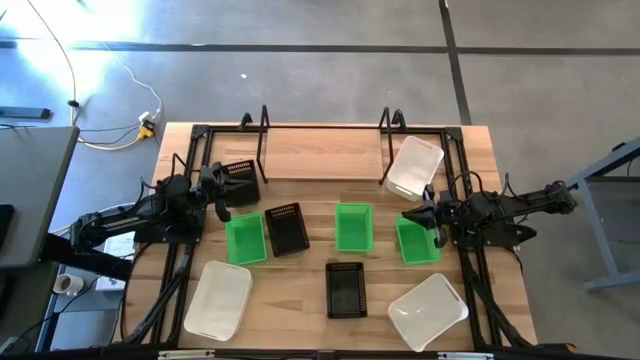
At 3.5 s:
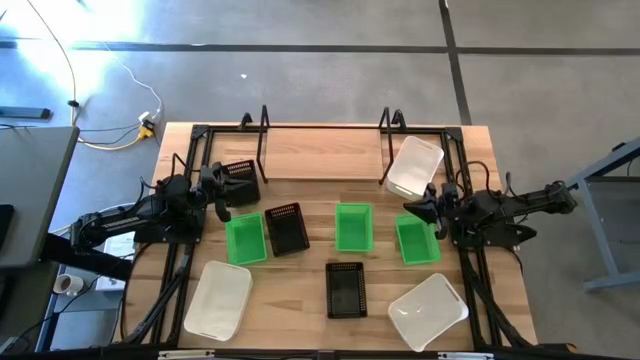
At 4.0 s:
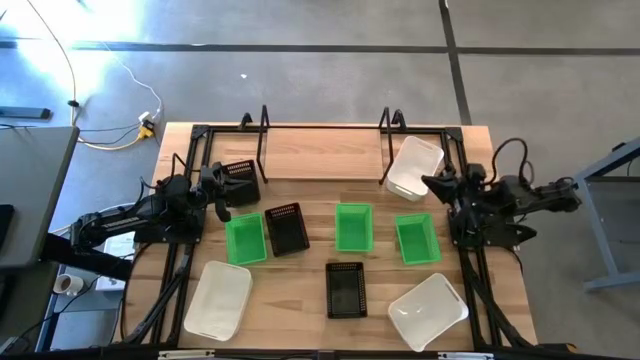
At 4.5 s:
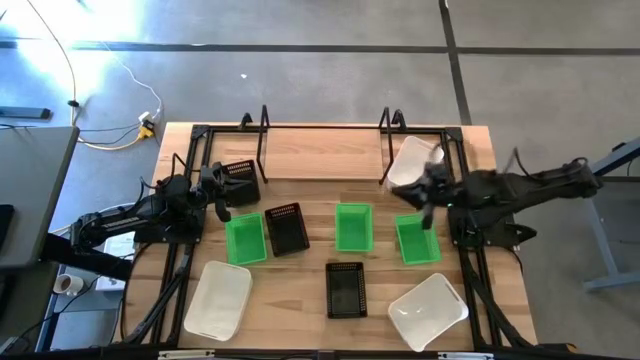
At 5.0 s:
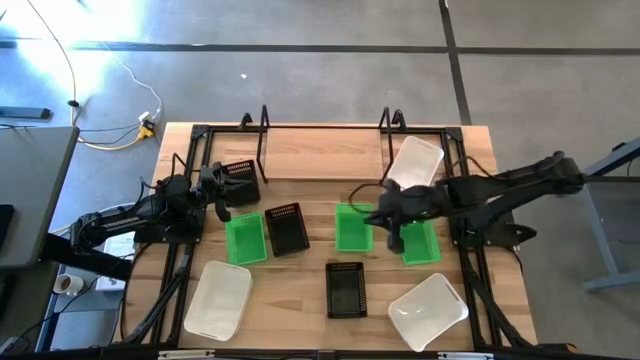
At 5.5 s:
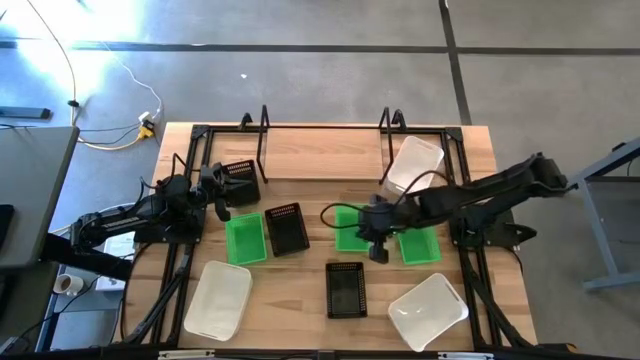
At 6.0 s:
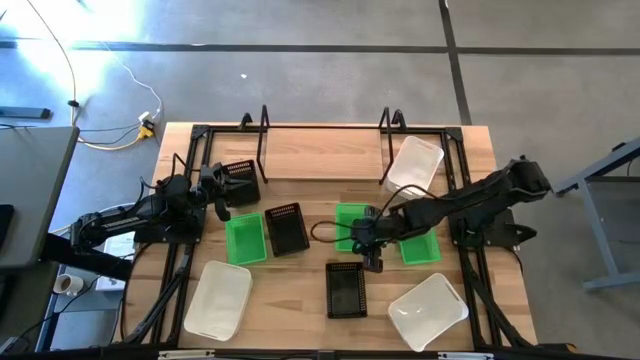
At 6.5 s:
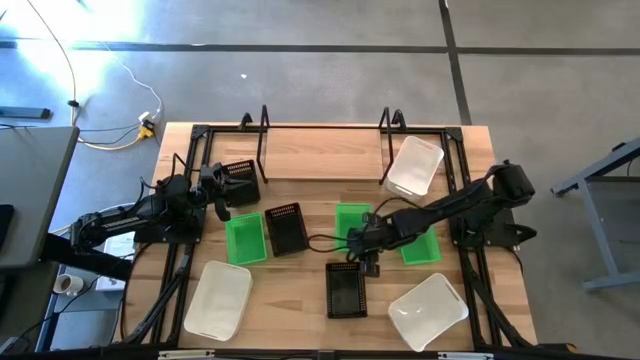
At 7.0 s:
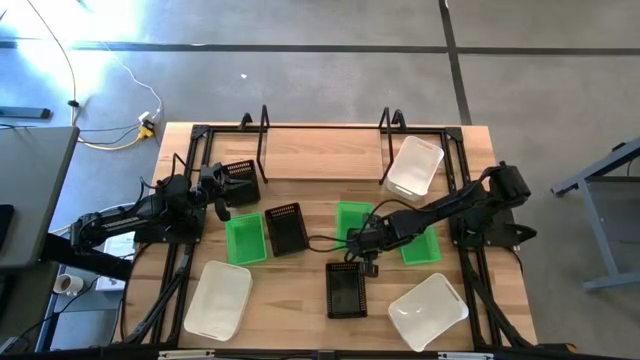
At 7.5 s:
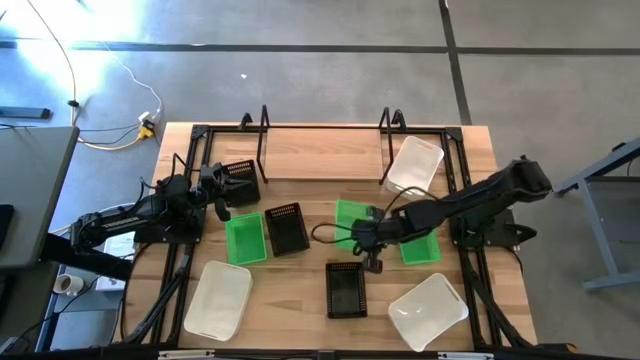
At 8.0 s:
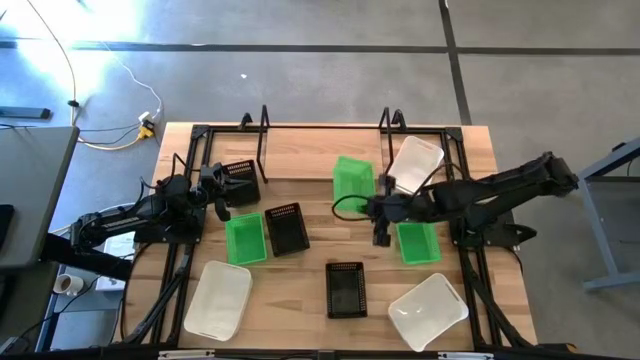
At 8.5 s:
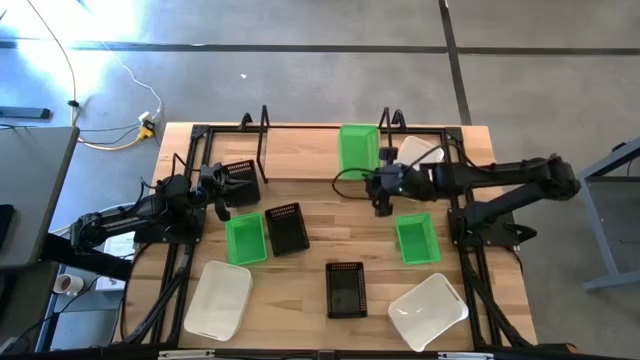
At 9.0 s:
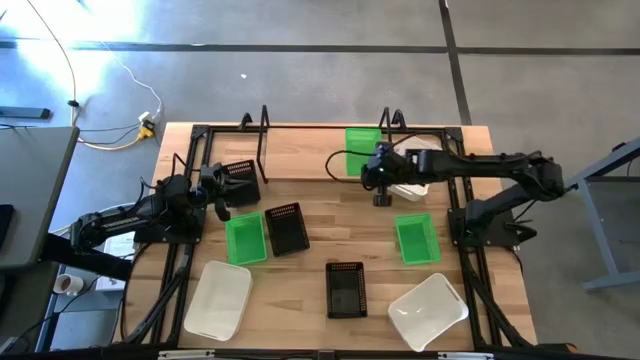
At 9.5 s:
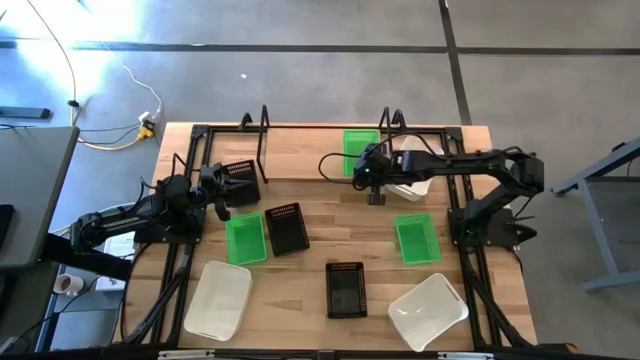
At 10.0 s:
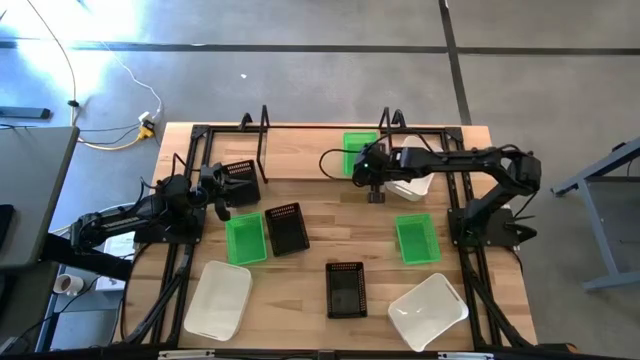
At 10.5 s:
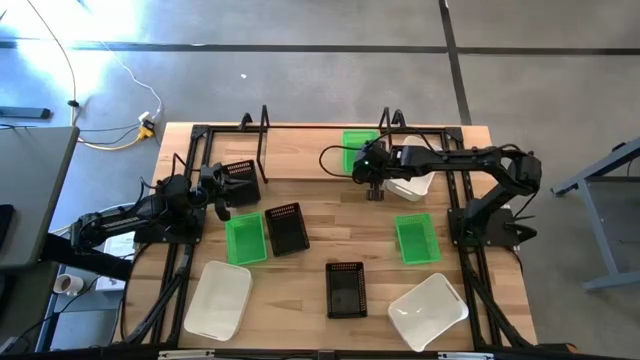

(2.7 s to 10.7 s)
Task: Stack baskets on shelf by color
Put the middle green basket on the shelf

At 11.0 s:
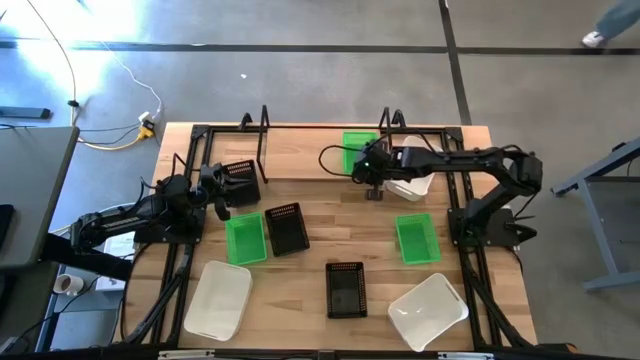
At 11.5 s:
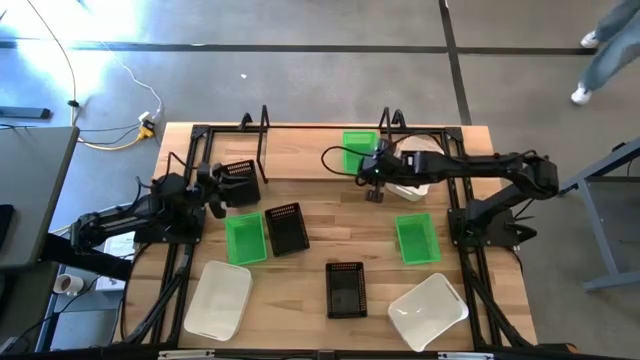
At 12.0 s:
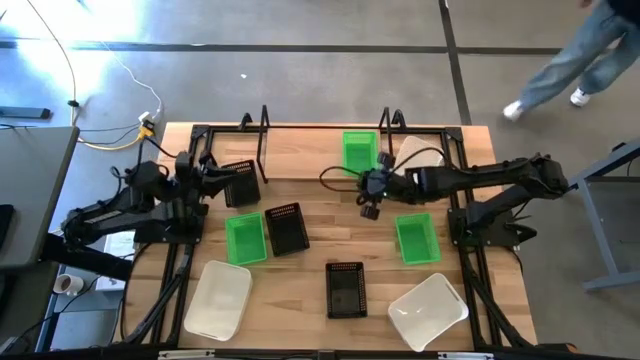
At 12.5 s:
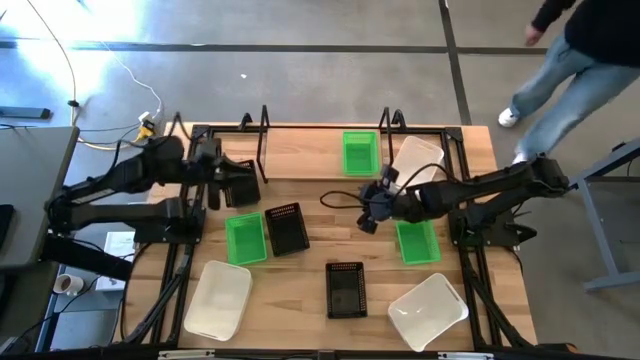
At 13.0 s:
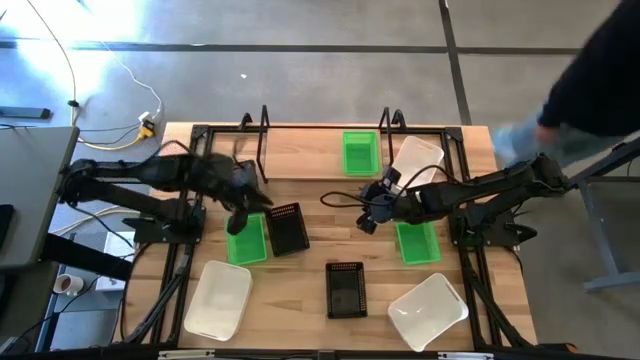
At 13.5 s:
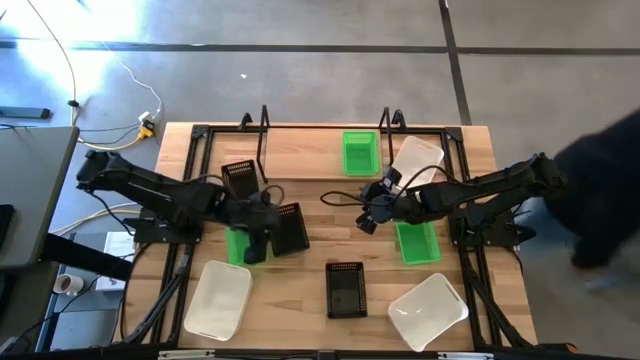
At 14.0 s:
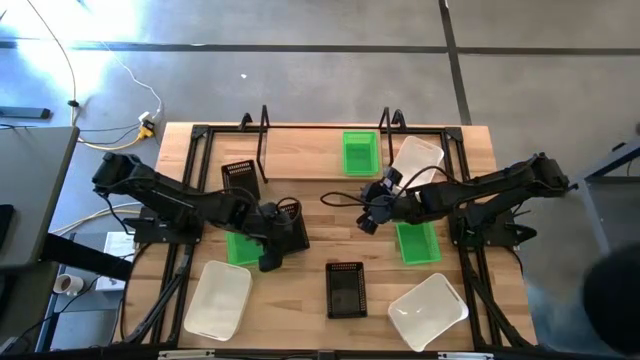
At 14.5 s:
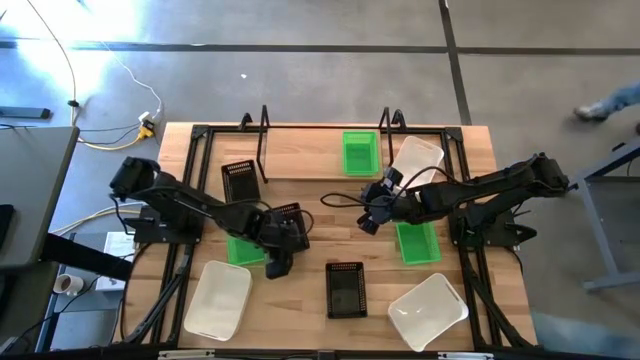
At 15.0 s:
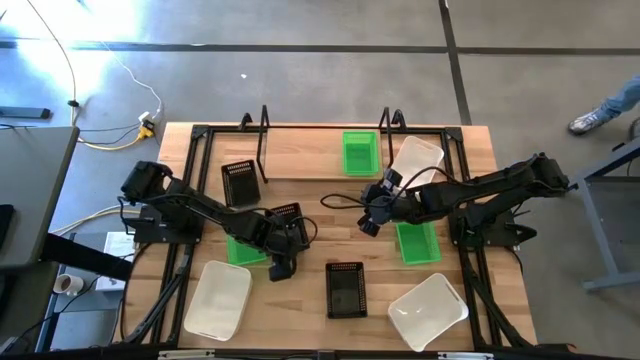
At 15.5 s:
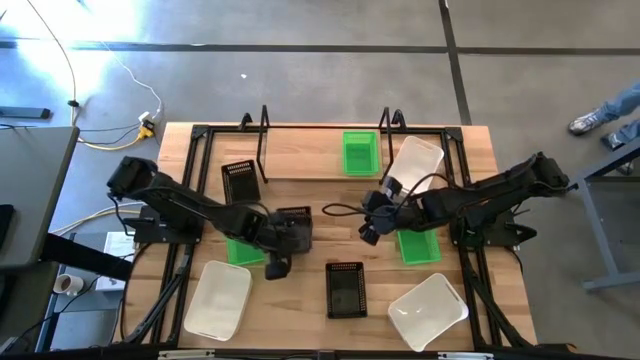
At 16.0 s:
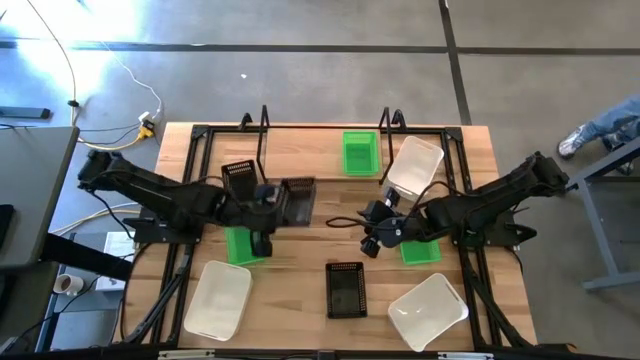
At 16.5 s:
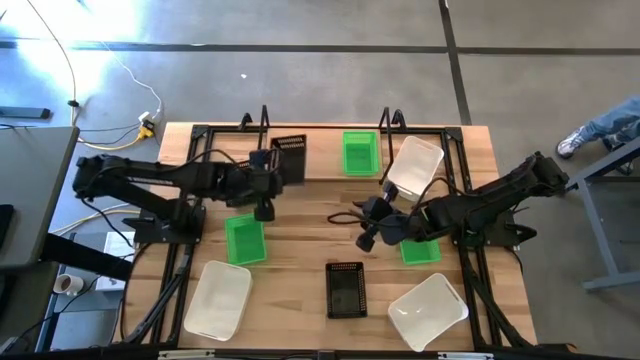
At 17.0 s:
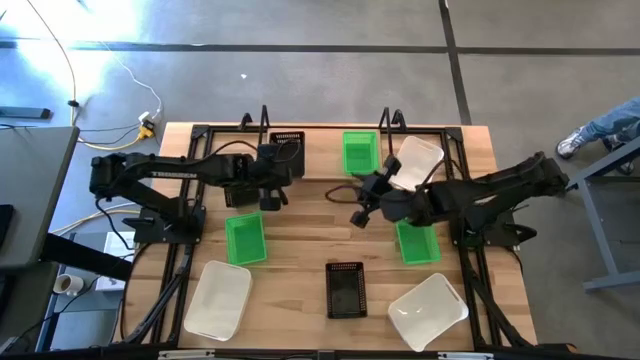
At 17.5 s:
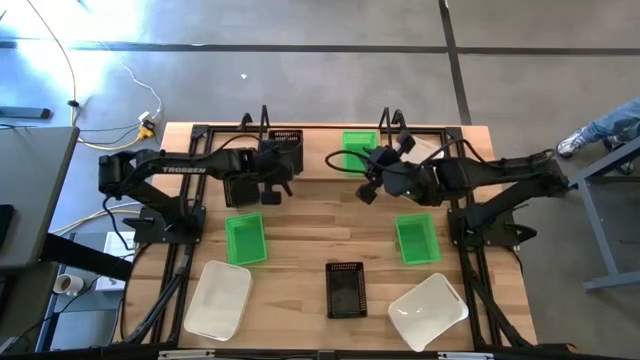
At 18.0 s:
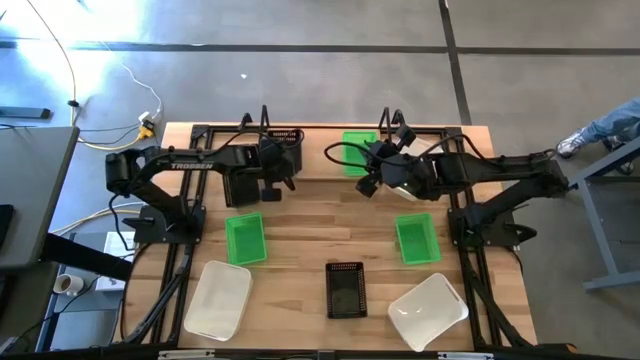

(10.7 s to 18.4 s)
Put the middle black basket on the shelf

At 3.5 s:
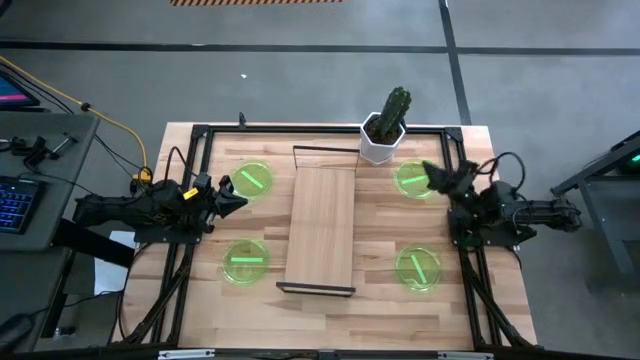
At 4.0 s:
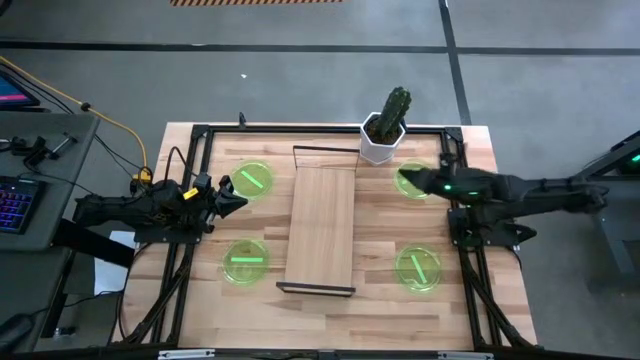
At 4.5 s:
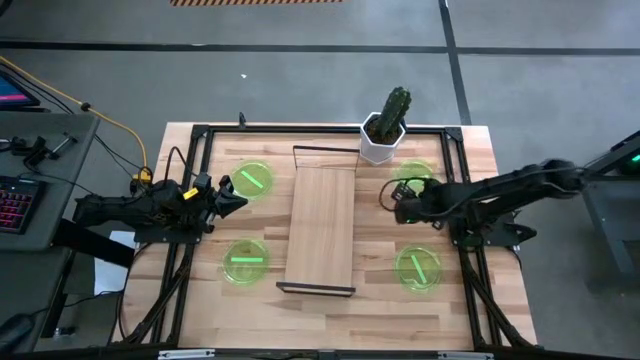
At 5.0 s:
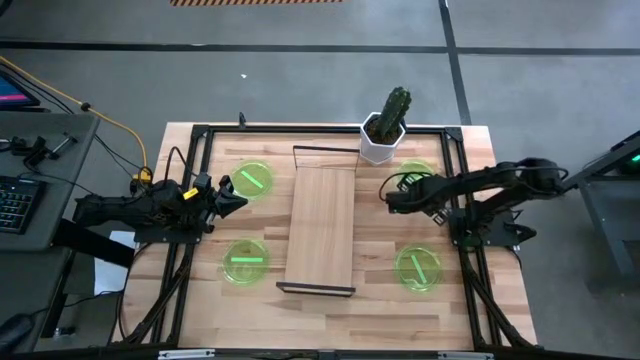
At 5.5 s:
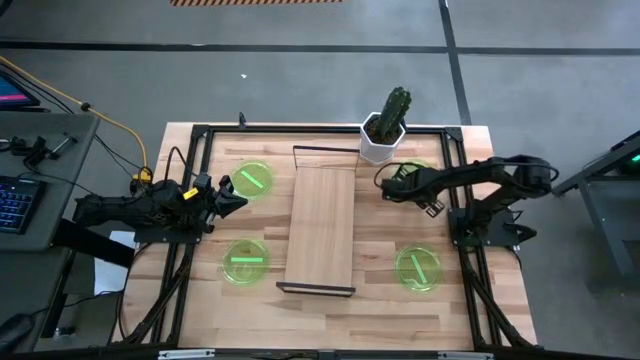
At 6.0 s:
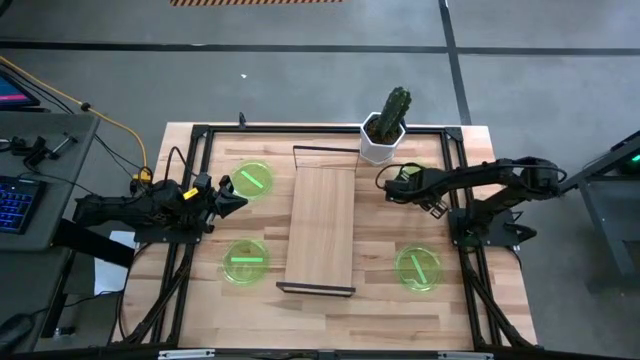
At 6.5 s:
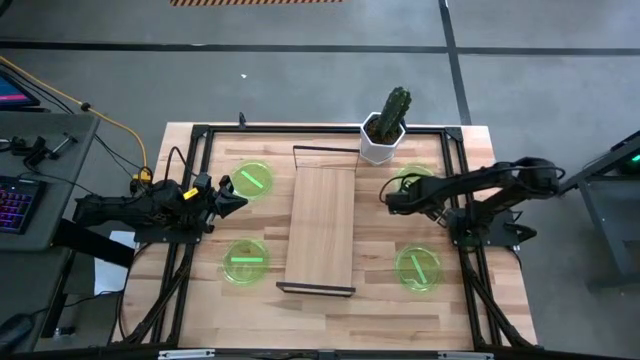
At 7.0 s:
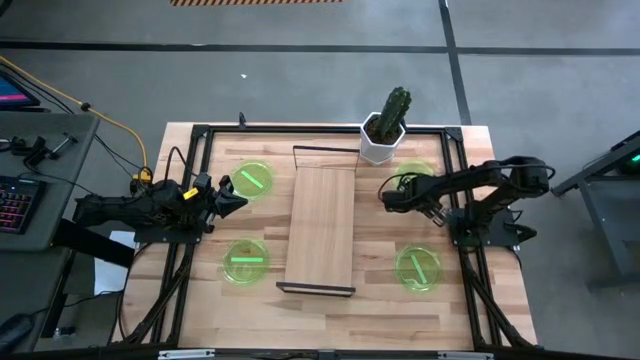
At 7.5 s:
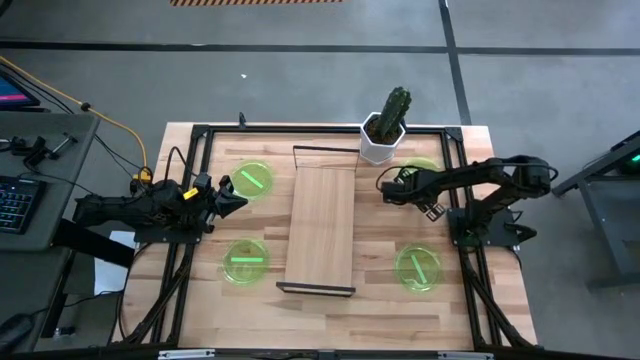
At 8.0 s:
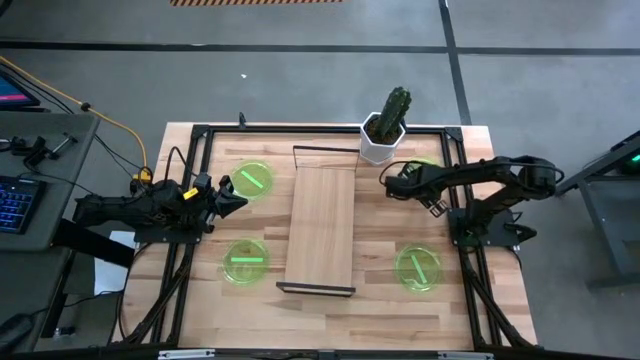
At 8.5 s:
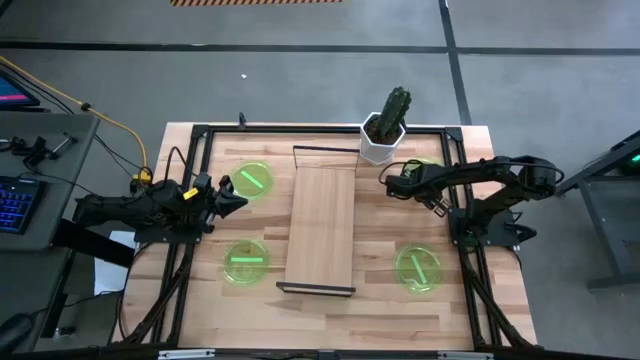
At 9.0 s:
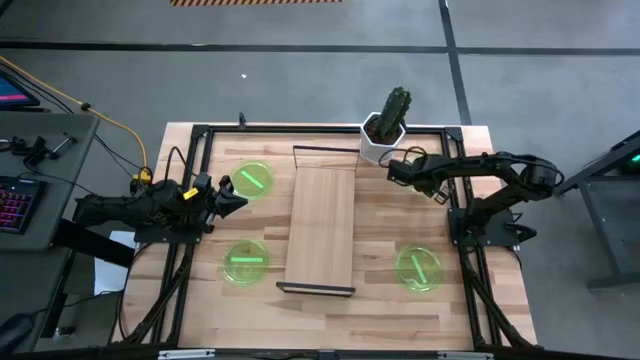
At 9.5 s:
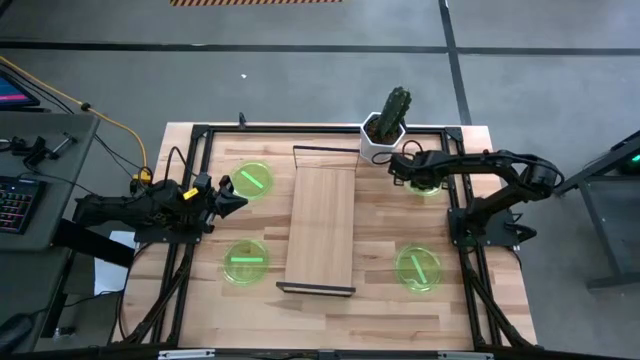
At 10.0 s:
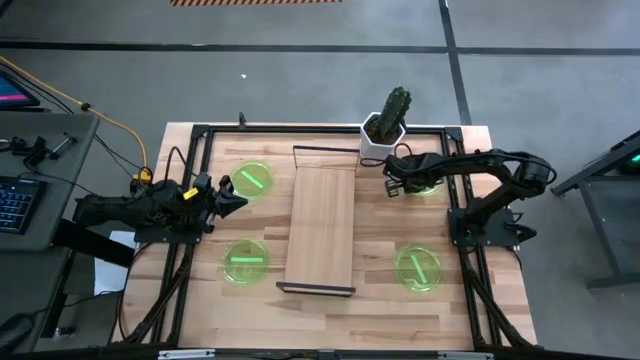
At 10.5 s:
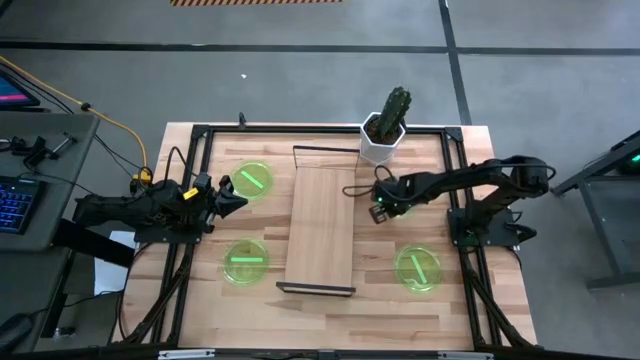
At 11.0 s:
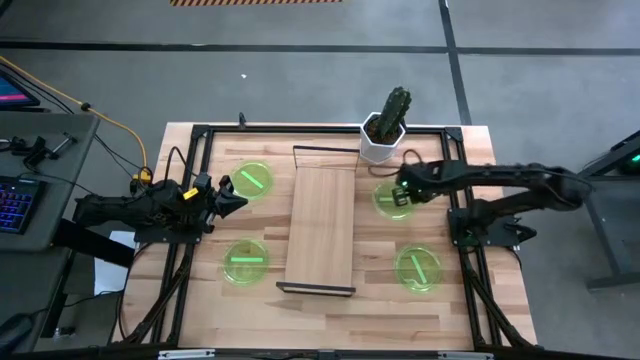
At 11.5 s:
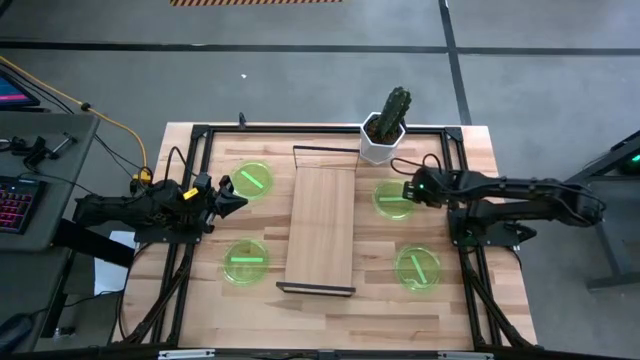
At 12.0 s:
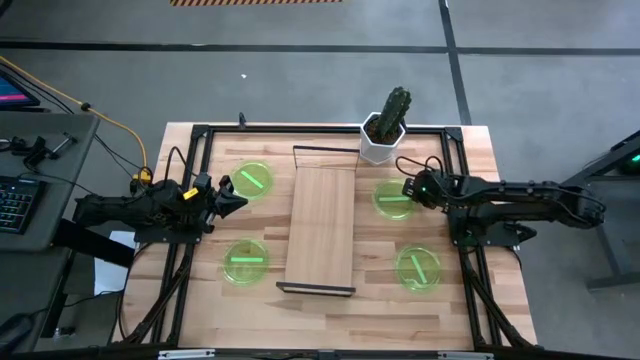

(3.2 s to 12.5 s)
Task: Place and stack plates onto a shelf
Put the top right green plate on the shelf
